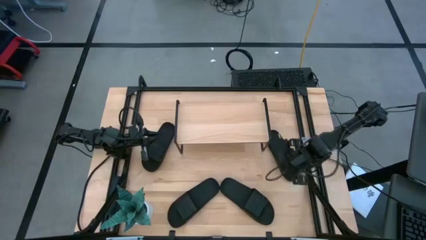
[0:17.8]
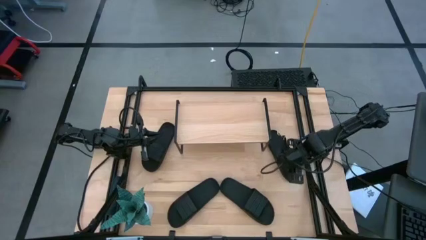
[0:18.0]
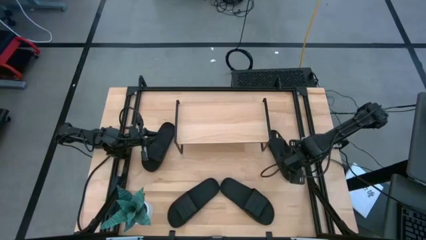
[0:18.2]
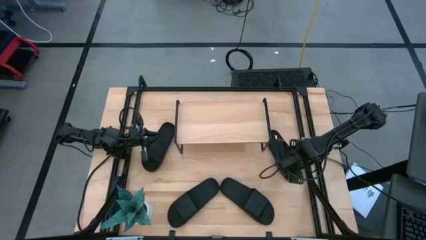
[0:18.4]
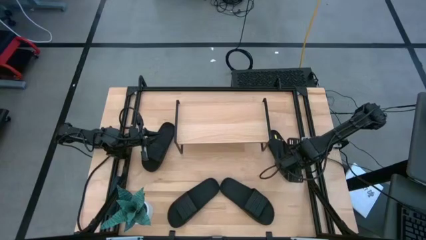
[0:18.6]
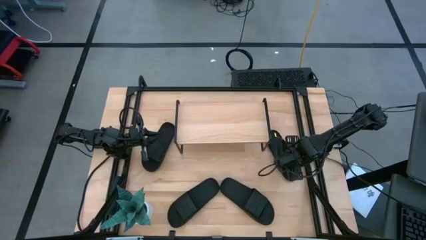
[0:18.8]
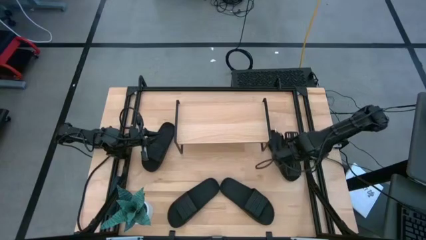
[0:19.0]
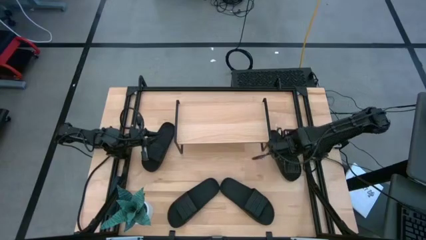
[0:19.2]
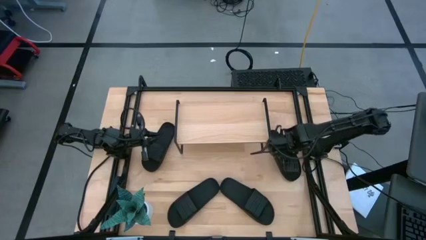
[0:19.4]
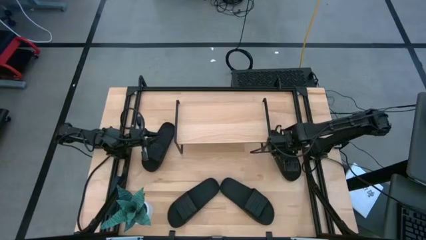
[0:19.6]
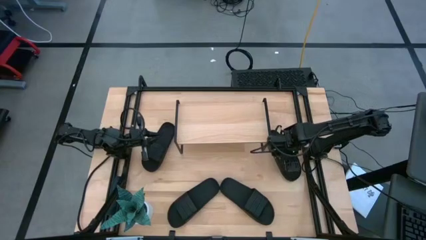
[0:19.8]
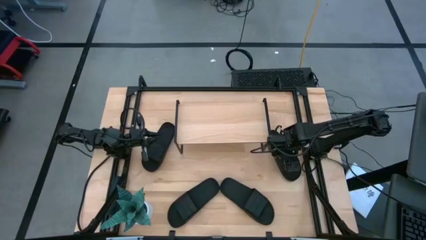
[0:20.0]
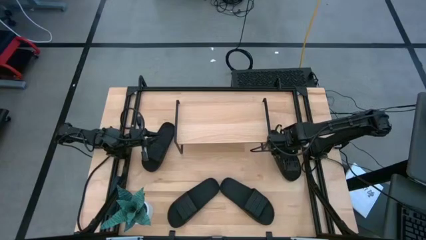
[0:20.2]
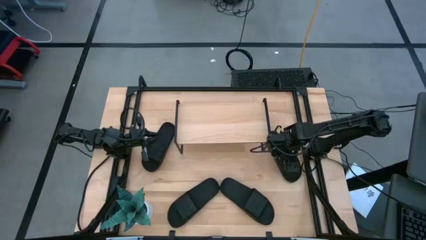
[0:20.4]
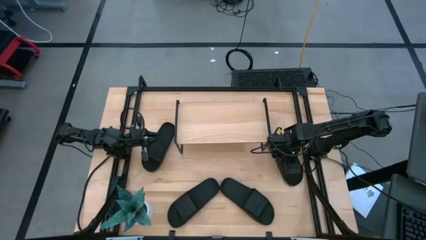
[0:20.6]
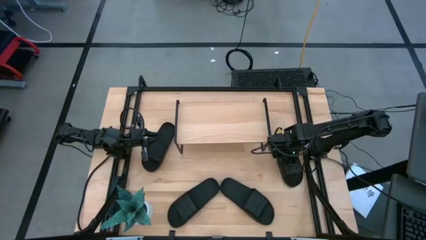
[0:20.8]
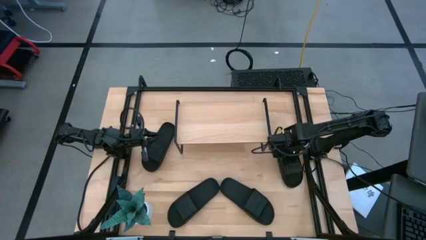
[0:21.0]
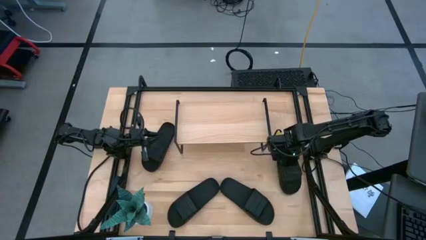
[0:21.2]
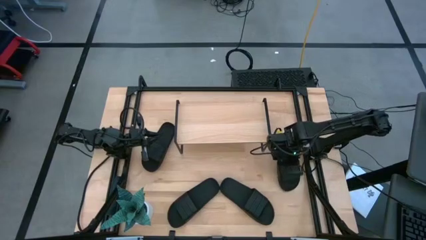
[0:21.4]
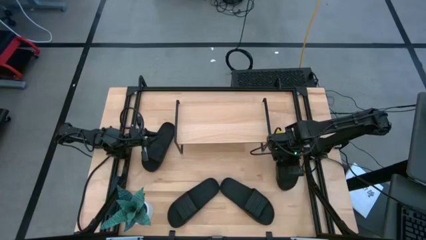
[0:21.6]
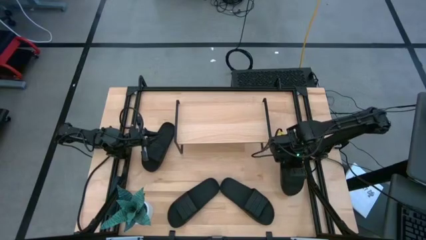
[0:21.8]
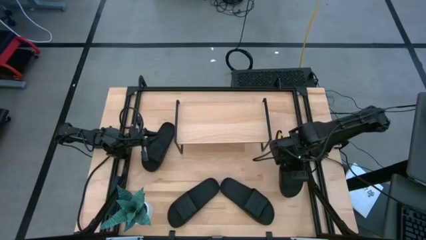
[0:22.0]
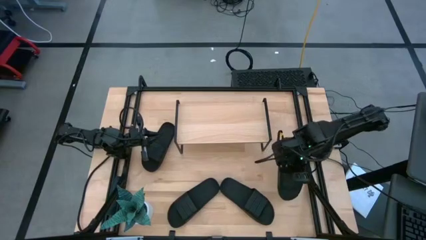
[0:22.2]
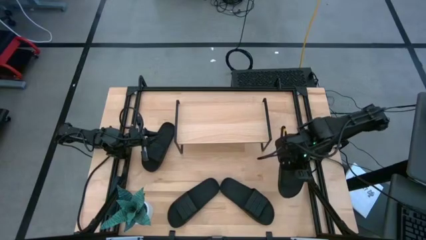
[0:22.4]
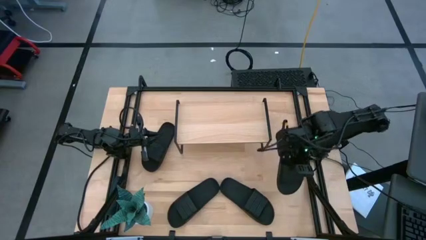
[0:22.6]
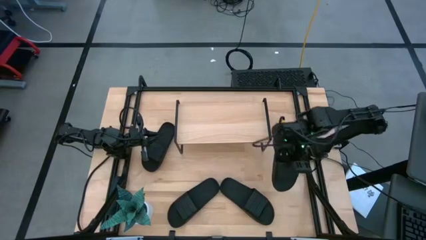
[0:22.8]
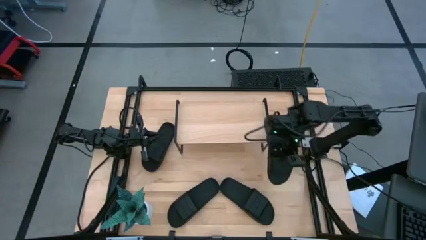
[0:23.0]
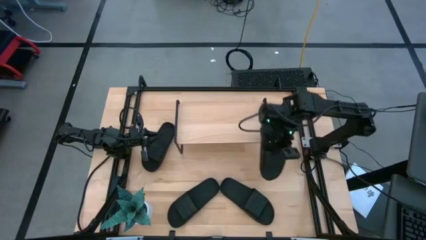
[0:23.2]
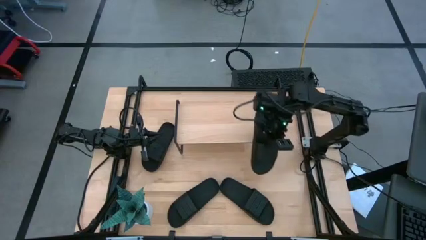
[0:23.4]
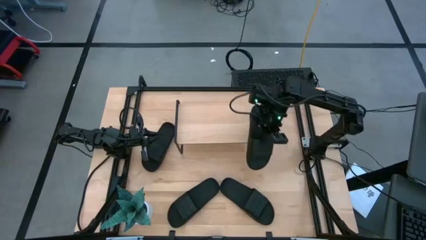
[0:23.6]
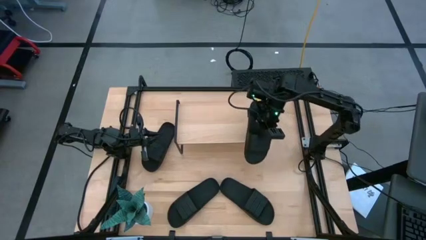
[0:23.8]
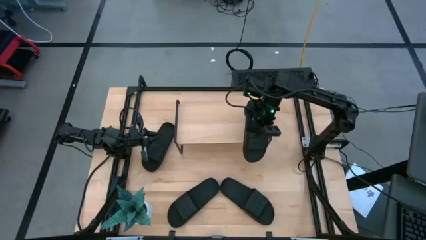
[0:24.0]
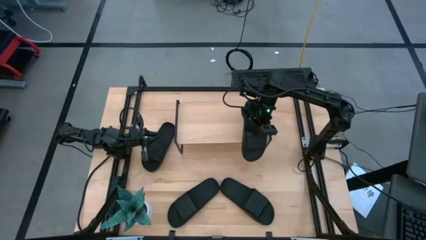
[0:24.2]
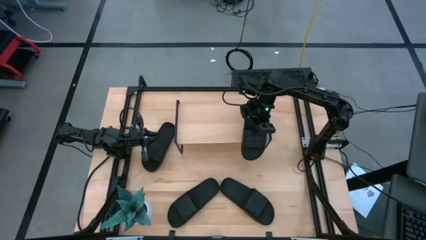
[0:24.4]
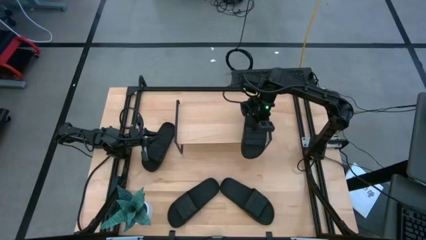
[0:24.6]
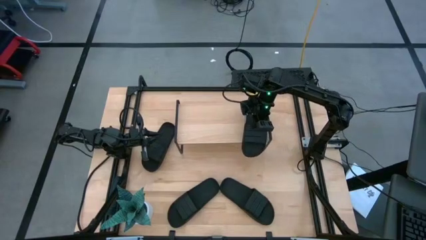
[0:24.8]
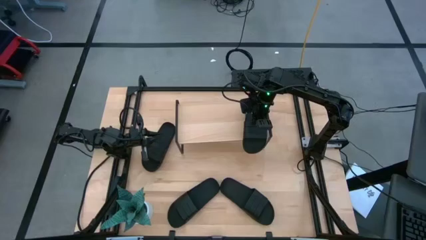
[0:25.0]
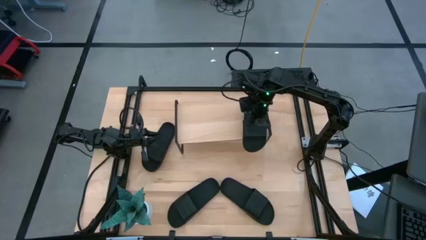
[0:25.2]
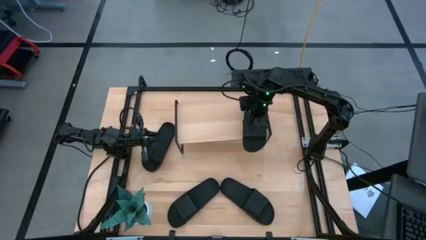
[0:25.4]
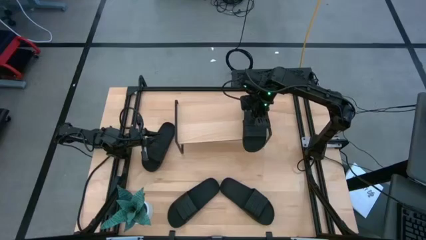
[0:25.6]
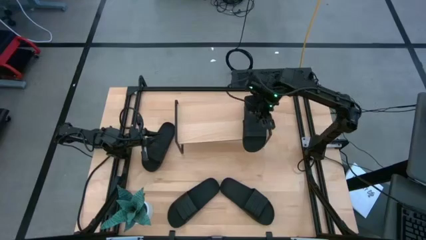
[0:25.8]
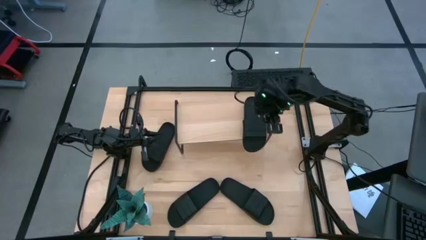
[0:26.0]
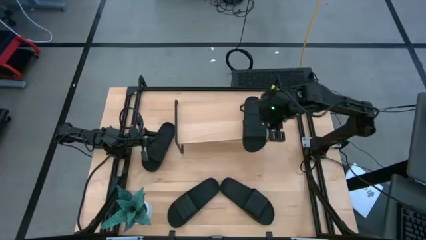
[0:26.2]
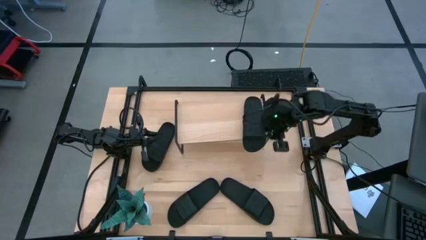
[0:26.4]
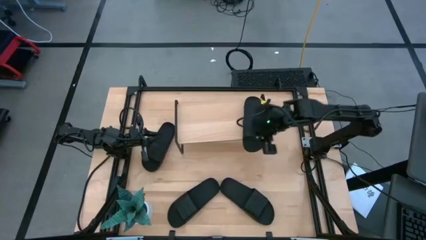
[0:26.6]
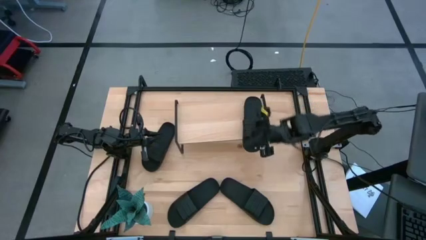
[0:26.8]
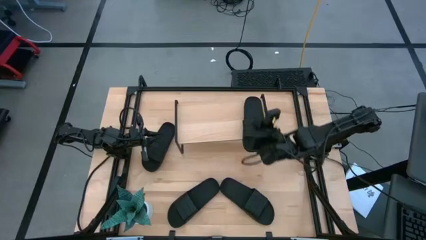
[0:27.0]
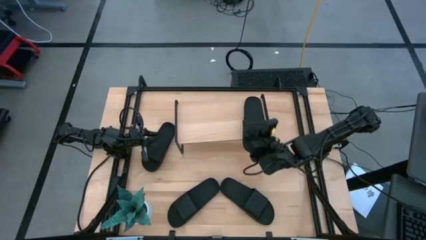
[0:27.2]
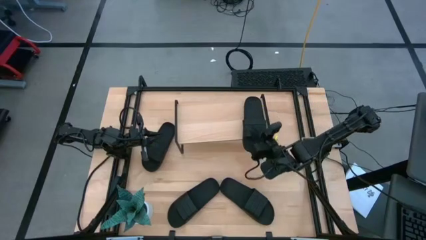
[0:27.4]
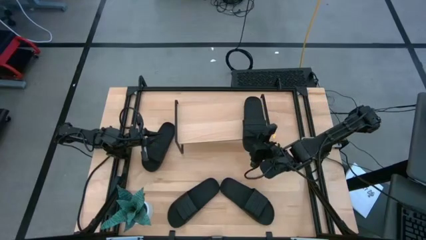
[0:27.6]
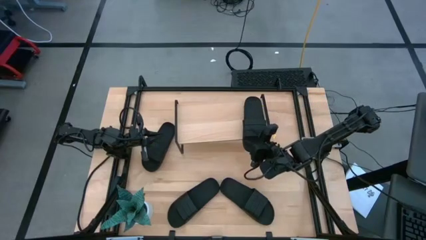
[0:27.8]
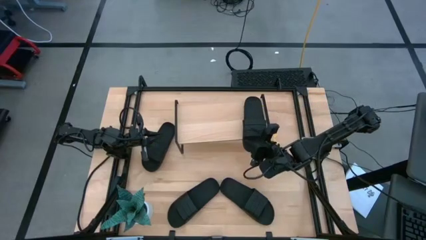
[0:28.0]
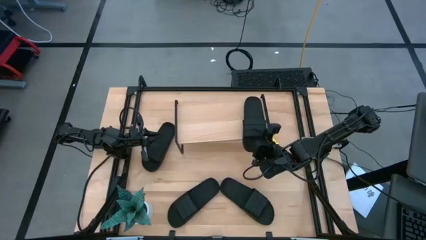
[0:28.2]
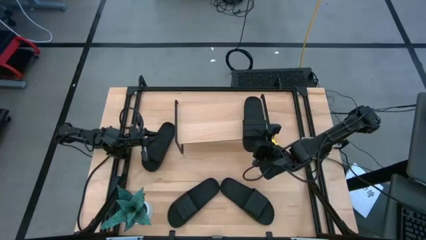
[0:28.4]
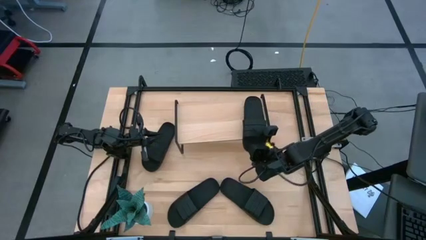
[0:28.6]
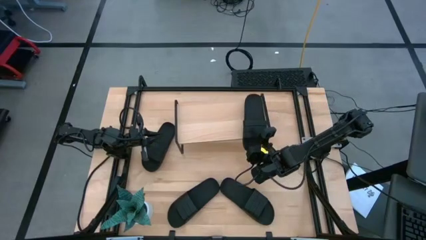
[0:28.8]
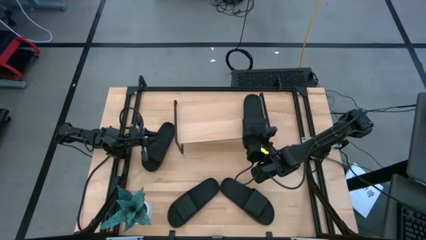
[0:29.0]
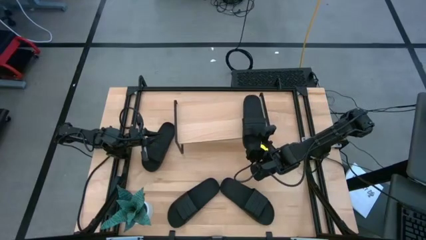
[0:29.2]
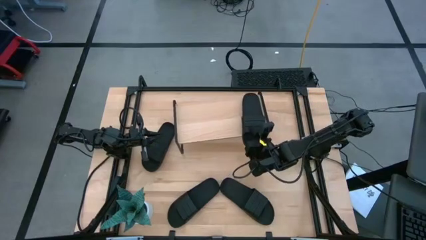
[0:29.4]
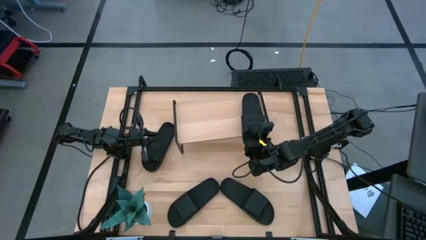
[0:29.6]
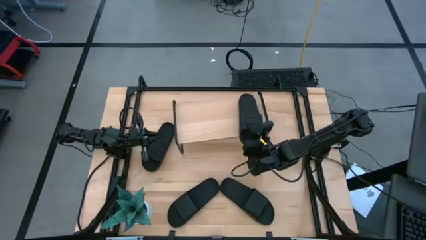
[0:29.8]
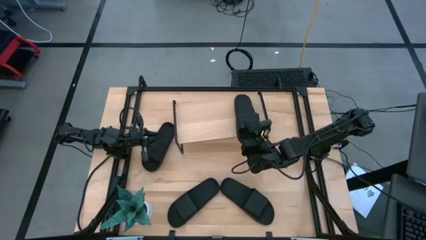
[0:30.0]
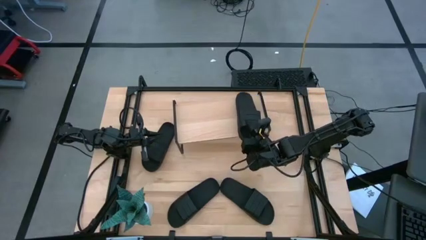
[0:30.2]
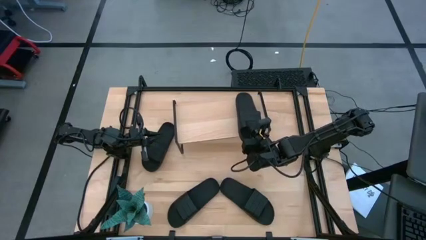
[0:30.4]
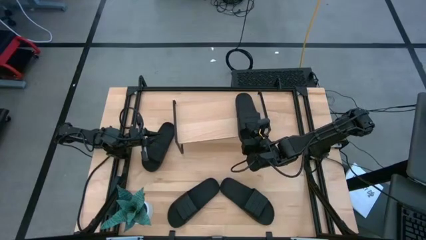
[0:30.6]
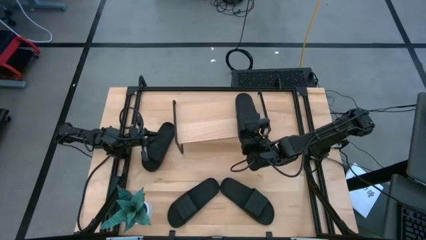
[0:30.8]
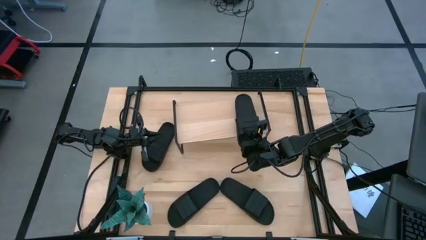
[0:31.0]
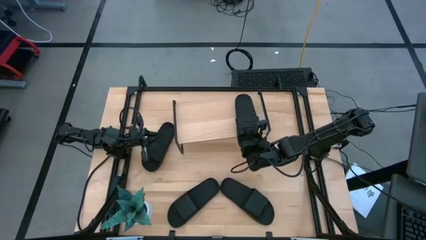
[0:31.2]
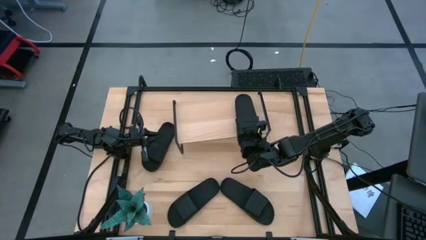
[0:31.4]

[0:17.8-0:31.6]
Task: Pick and place slides into the shelf
Put the top right black slide on the shelf

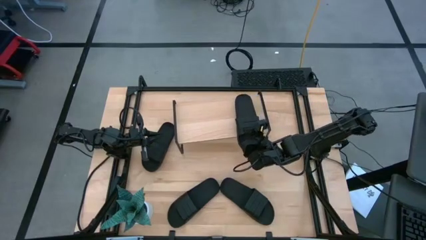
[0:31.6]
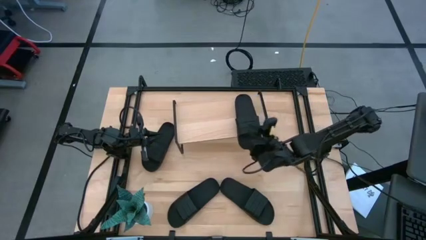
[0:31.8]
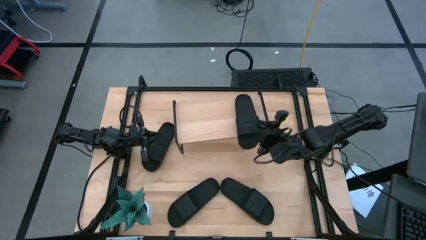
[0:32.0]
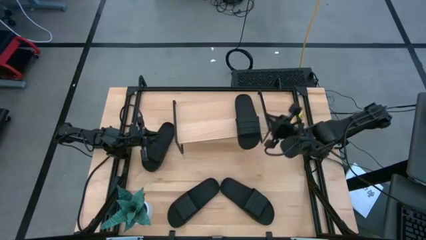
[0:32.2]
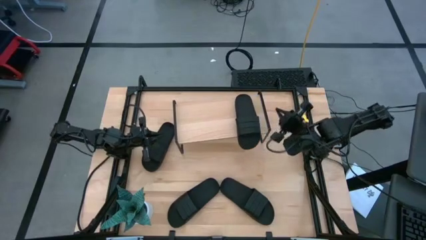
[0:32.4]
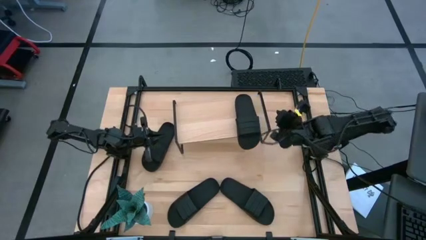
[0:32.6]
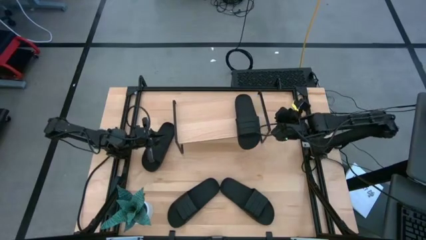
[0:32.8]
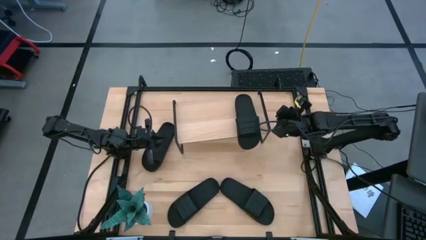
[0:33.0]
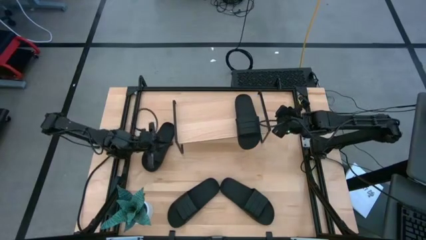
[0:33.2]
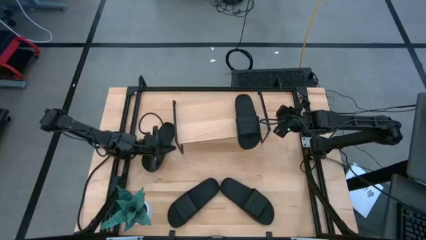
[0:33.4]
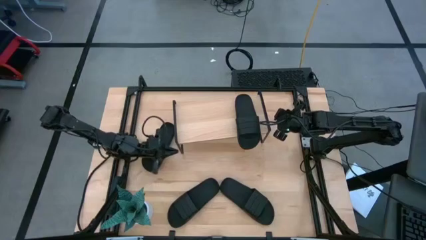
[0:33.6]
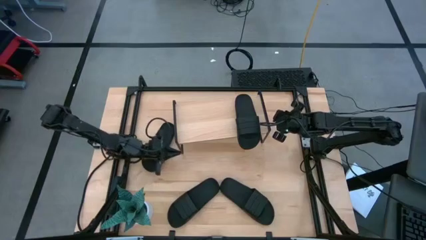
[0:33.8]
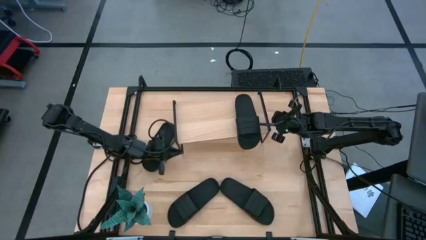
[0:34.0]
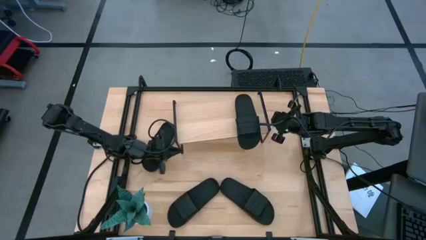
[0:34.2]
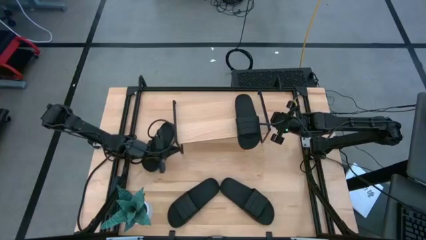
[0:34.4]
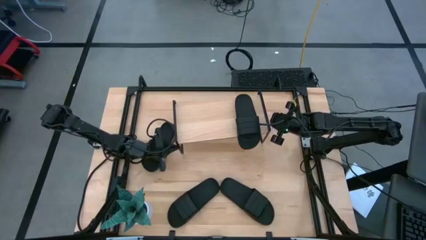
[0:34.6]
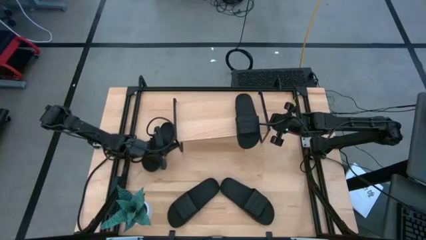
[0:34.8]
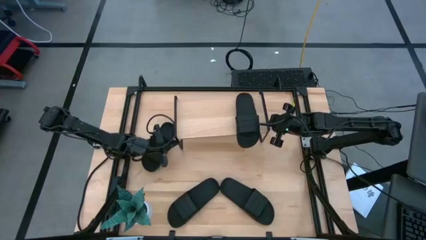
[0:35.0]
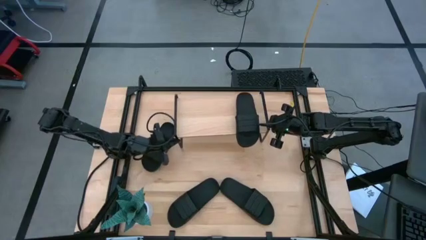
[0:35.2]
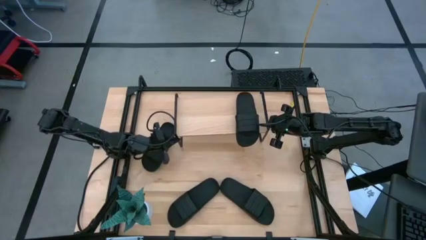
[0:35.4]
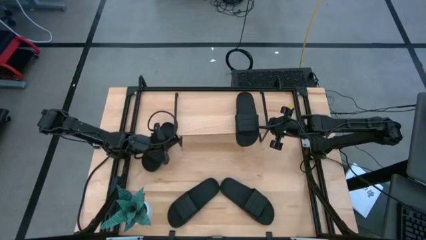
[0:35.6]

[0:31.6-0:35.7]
Adjust the shelf
